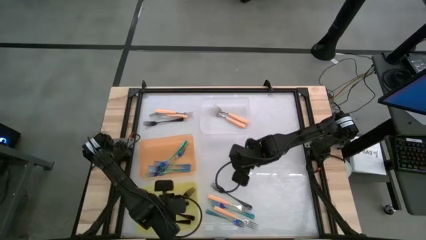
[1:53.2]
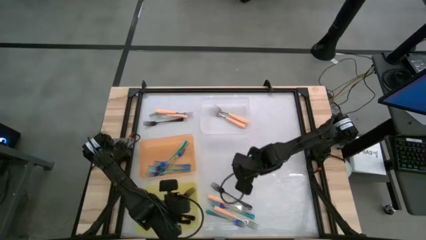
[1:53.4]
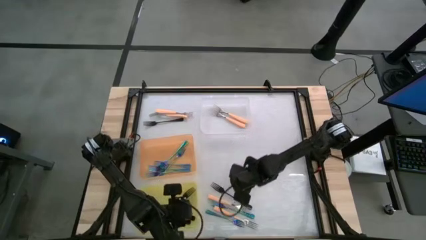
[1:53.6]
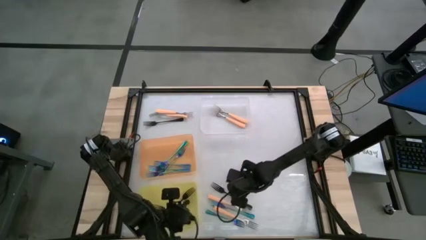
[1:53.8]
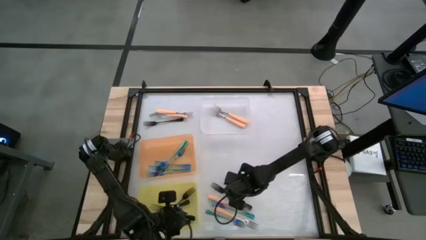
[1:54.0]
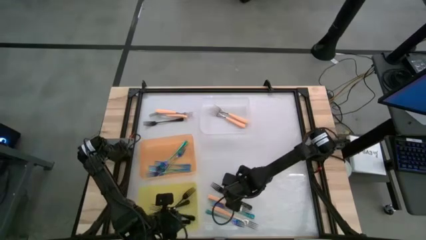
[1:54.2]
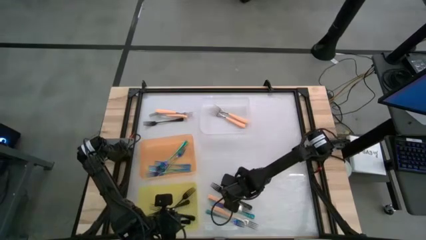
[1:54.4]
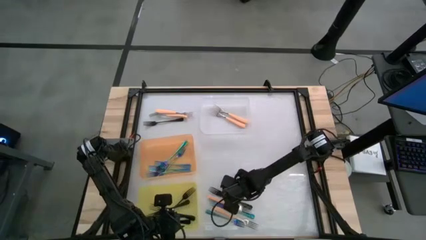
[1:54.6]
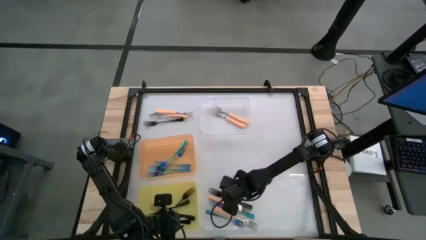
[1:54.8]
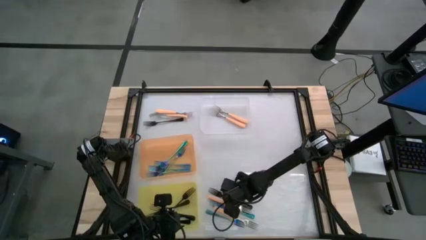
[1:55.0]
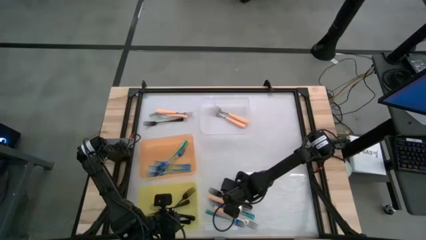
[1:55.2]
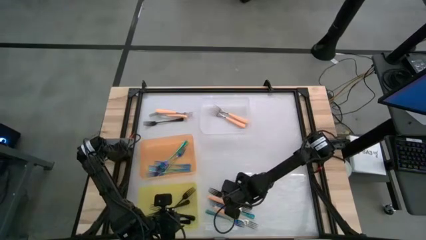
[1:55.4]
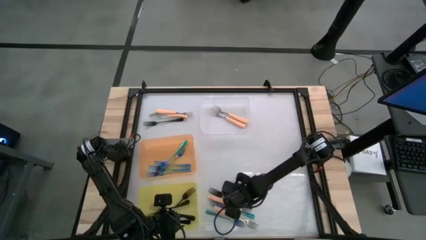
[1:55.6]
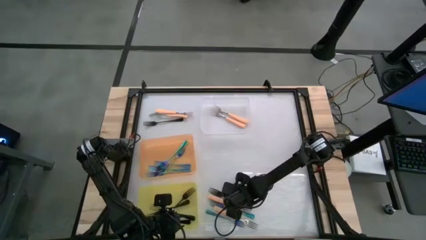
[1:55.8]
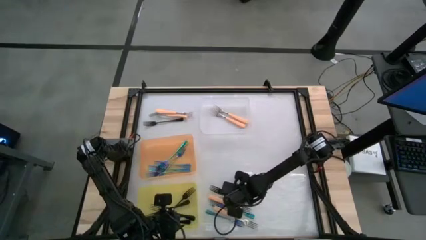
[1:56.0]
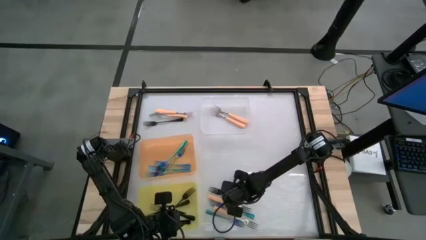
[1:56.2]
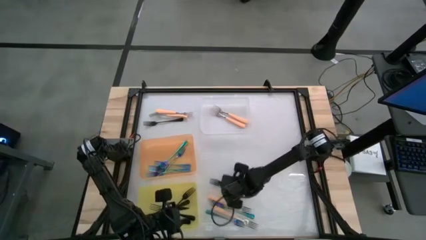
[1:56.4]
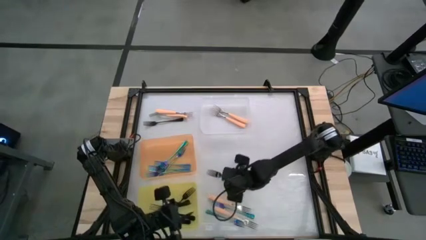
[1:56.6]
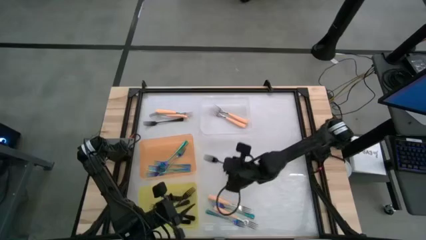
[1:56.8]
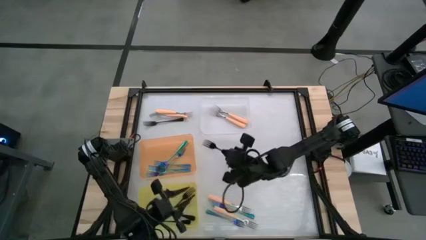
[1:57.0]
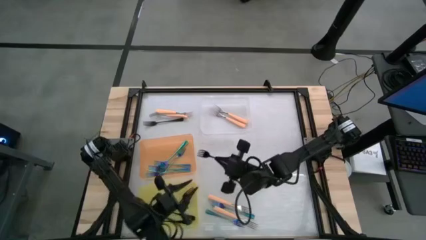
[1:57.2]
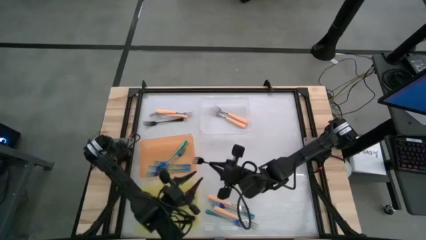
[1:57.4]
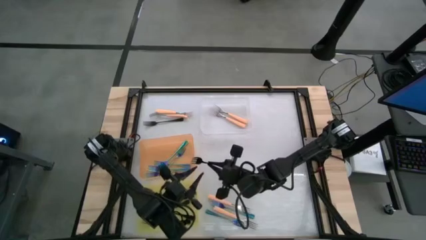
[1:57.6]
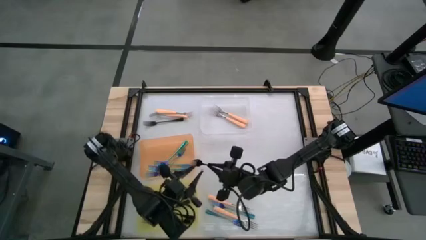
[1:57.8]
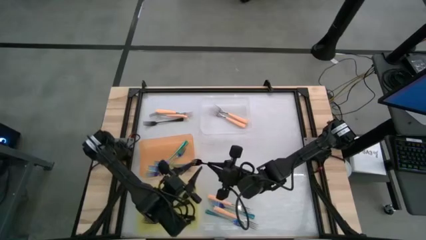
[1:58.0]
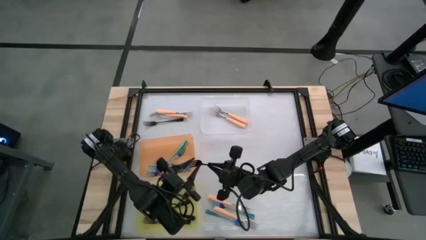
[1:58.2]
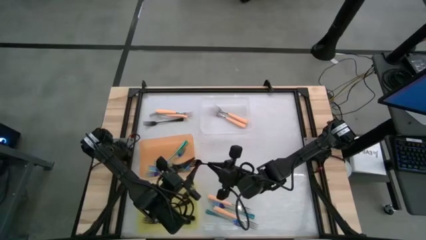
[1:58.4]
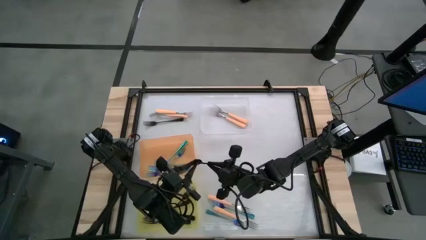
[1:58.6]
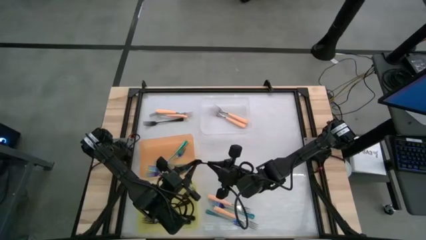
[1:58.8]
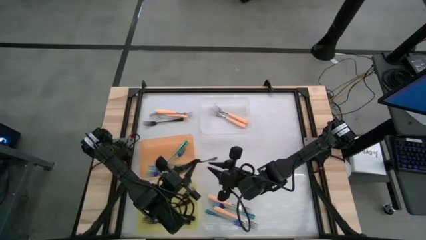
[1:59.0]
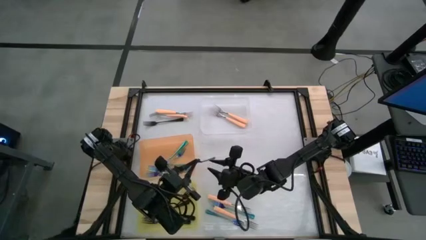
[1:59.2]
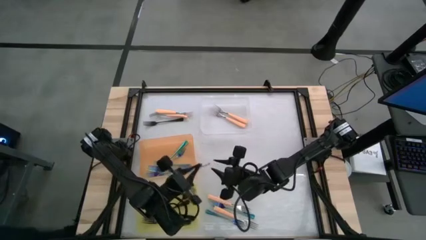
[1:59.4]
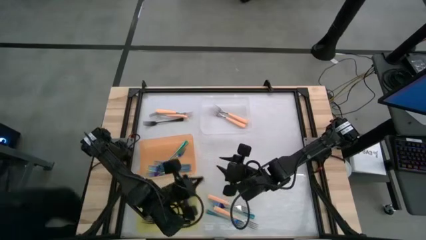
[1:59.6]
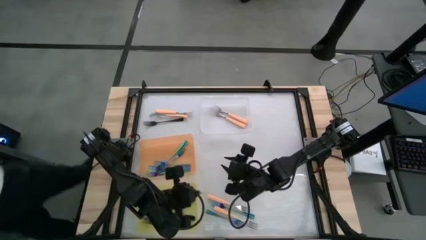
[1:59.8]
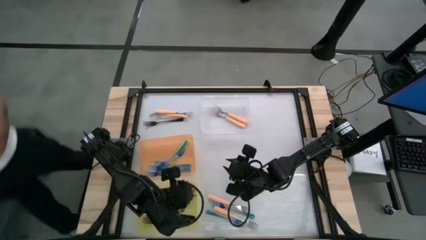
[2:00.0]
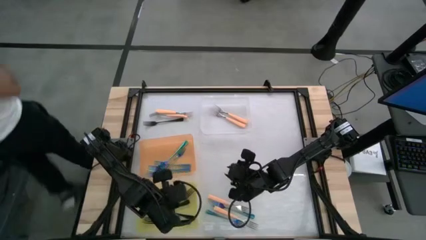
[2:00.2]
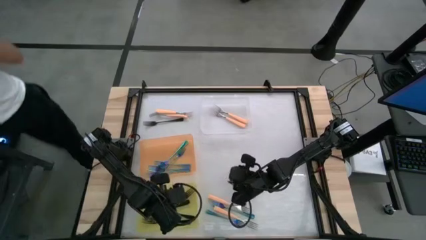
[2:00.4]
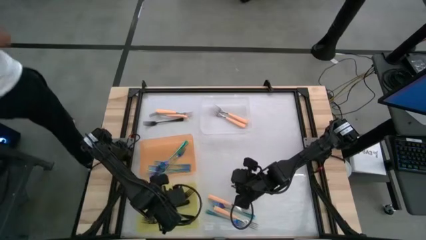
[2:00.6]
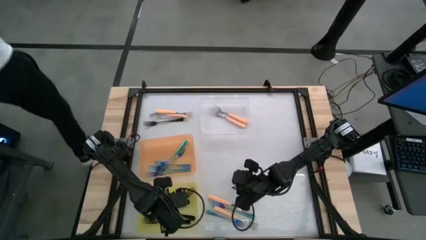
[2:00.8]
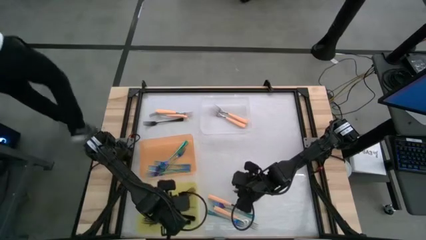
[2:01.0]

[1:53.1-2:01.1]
Task: Sort silverware by color (type)
Put the black fork into the yellow bin

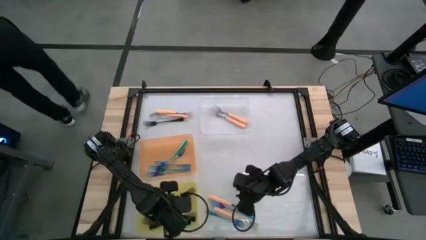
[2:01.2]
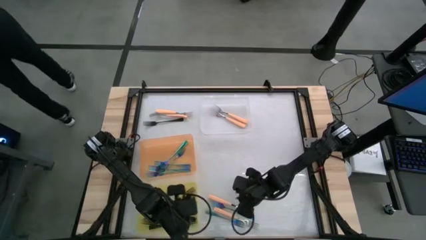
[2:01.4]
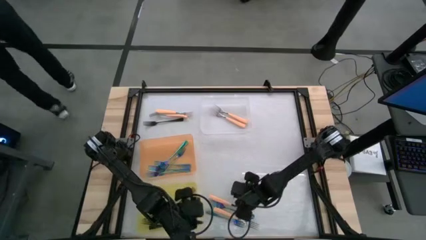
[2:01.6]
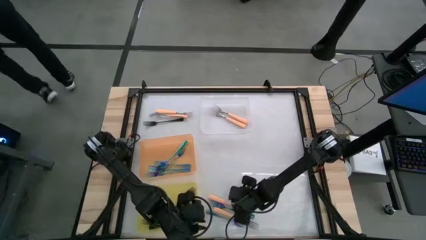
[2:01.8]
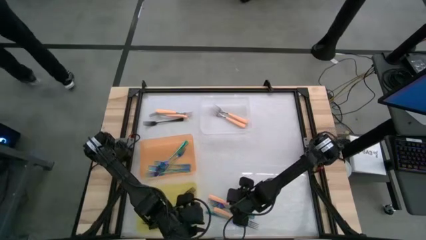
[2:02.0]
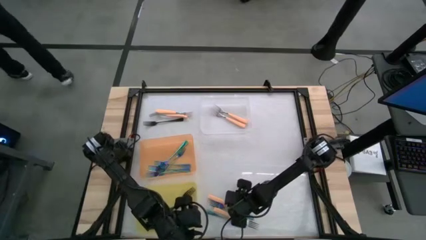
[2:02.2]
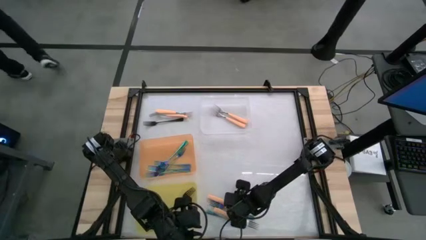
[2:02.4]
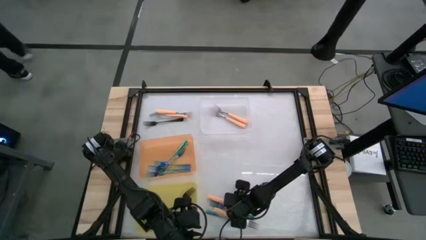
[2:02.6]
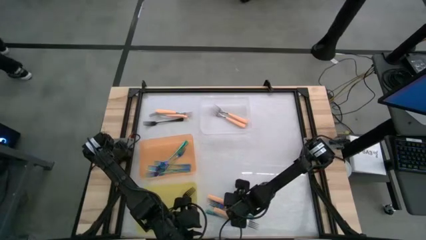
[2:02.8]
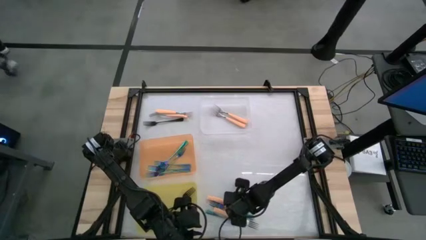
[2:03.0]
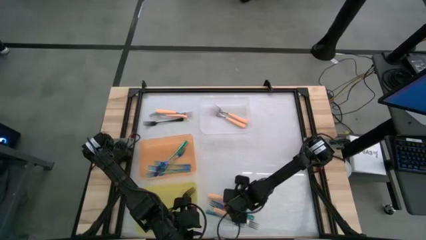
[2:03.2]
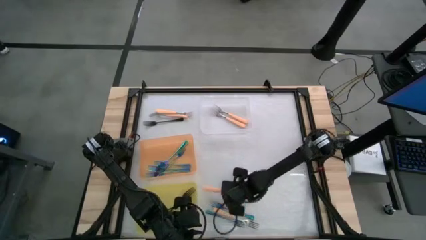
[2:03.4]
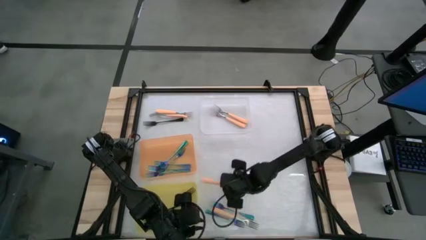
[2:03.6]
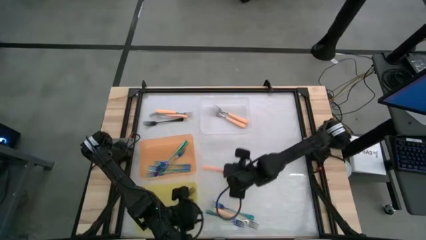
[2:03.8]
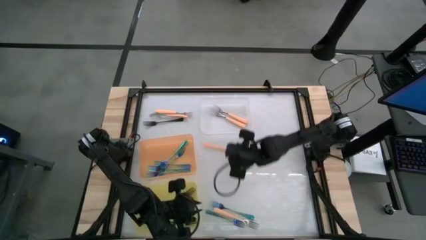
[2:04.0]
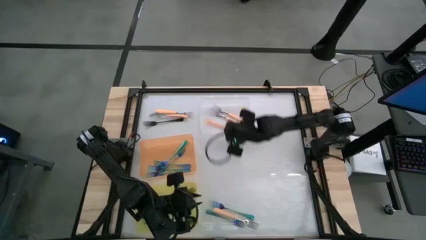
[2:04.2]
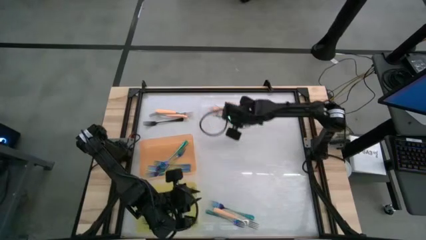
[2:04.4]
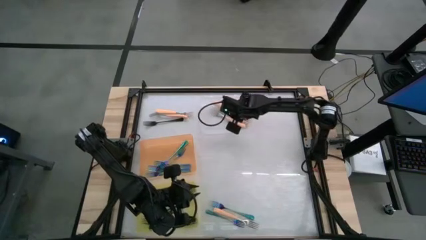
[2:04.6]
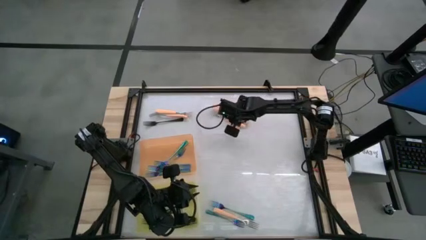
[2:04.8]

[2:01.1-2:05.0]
Put the orange fork into the transparent bin

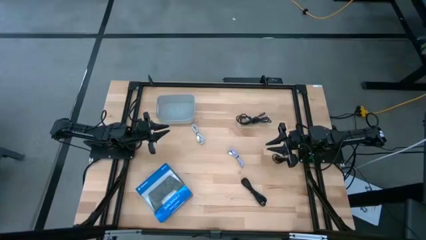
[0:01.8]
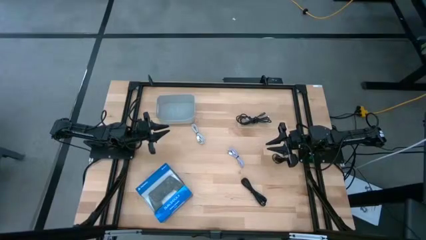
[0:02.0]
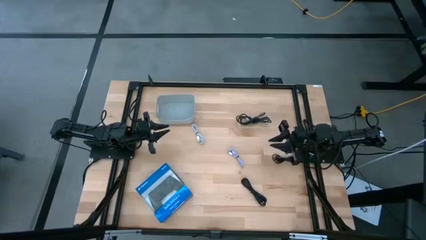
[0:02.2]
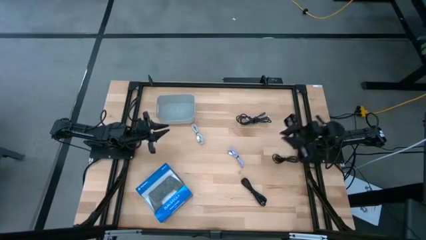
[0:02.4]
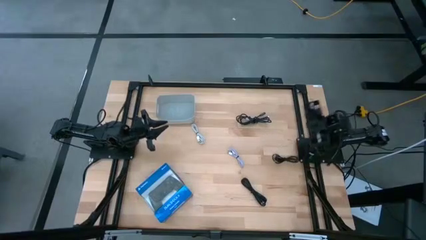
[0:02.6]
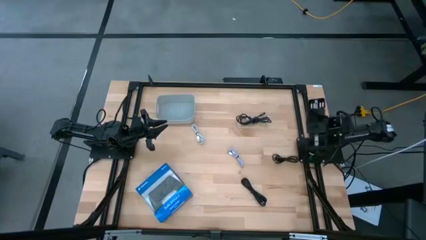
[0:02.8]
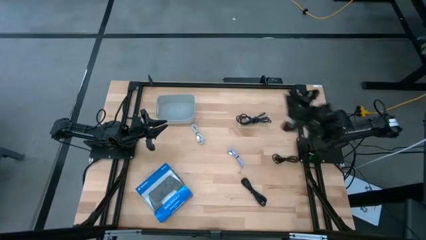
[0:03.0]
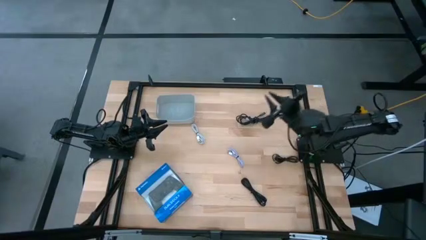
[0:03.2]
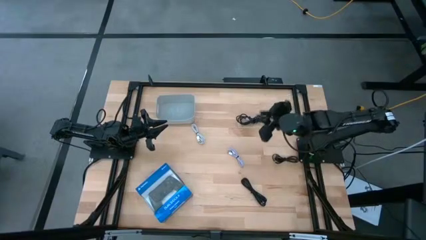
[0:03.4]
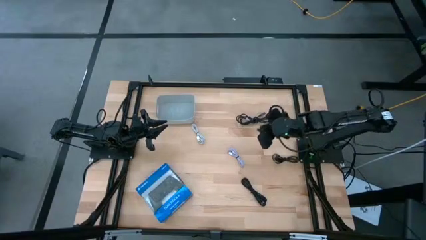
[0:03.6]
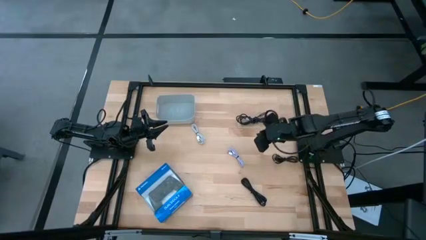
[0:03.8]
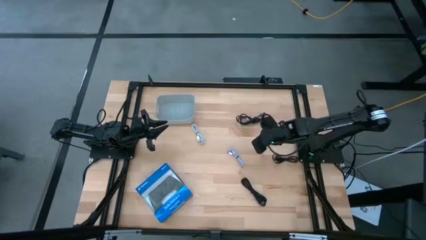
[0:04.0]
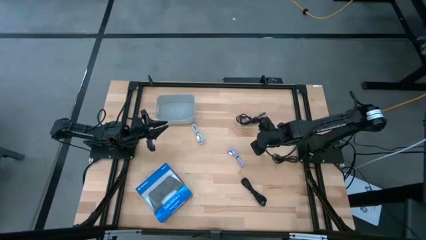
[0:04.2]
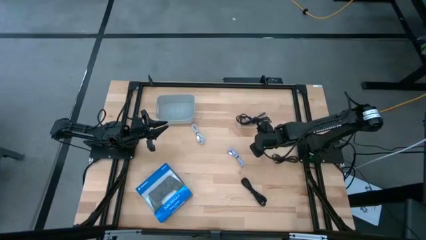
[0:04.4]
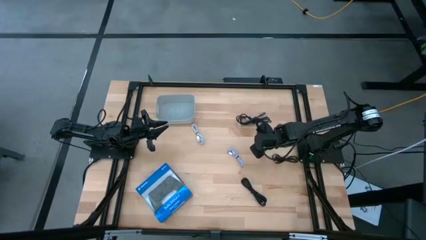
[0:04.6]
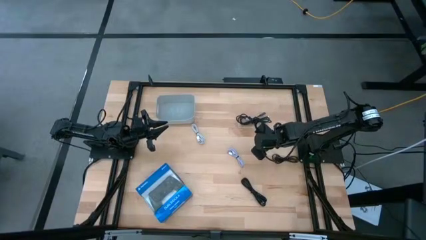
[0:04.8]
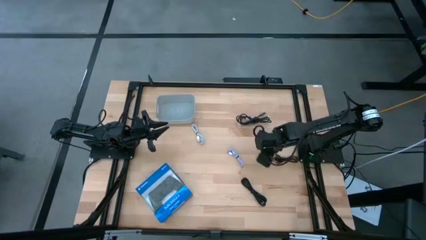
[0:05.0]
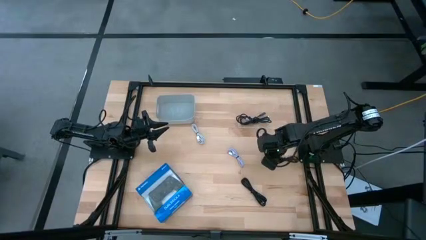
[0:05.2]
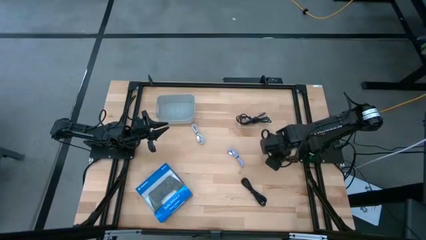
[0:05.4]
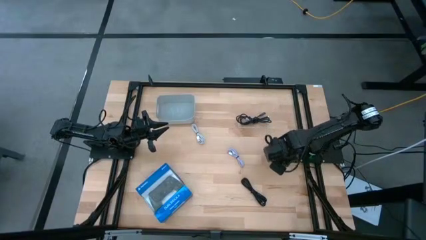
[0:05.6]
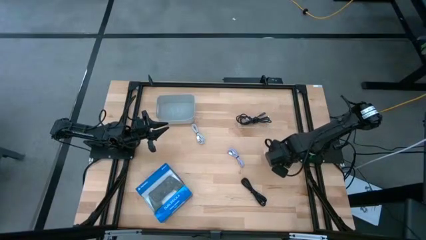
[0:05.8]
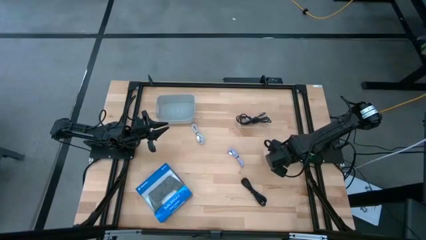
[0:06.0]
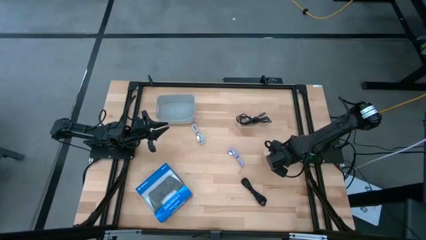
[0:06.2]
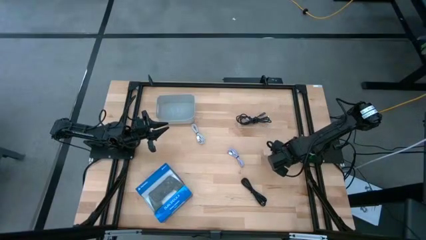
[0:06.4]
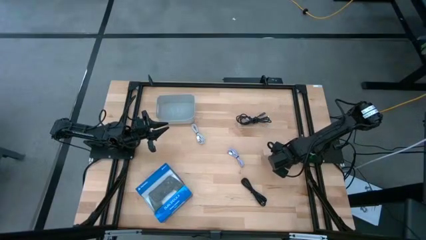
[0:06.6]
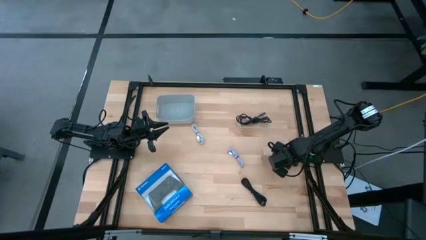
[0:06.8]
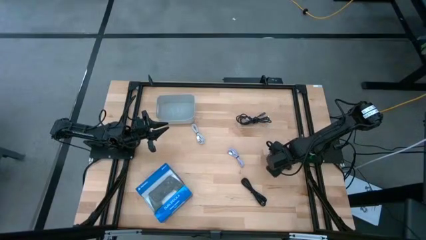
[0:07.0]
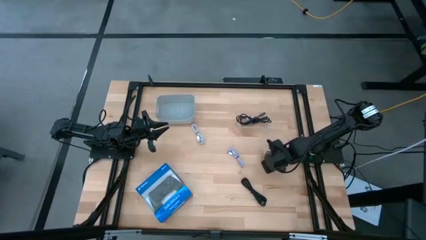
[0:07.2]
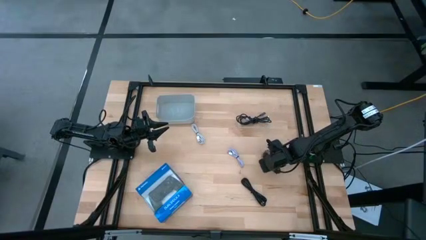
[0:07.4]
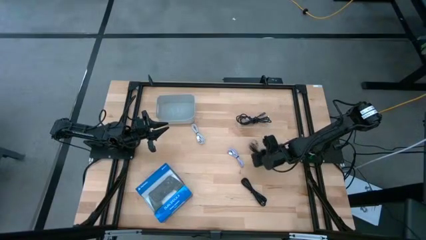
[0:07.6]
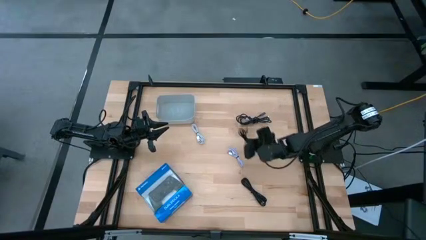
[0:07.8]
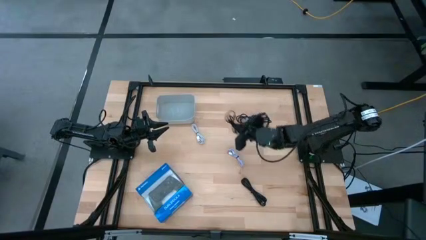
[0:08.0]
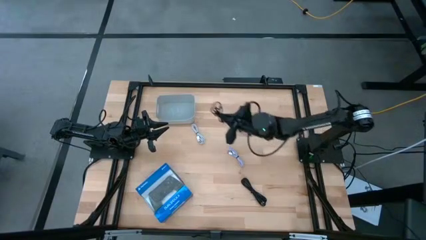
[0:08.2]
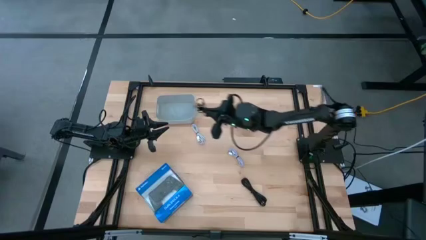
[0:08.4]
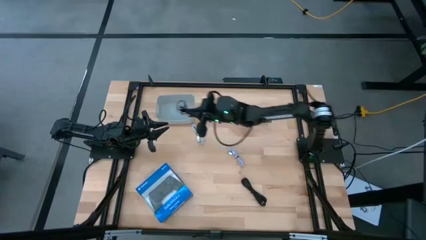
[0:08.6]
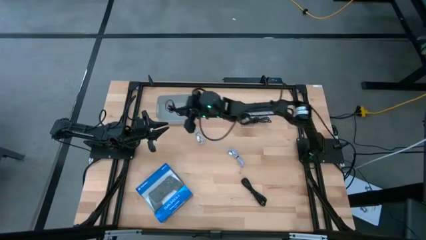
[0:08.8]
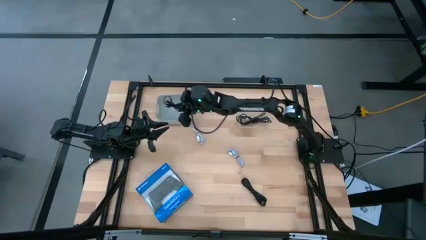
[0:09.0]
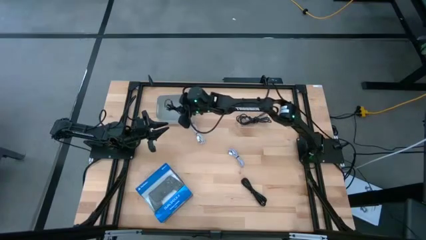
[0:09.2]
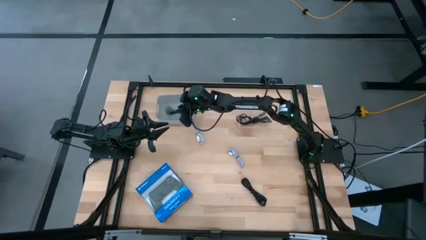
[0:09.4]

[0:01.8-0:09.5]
Task: Pick and place USB-C Cables
Put the top black charger cable into the white bin
